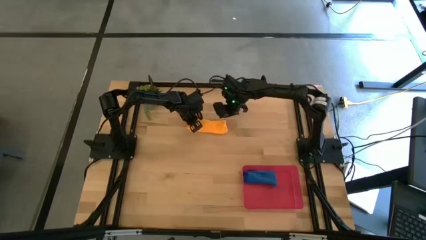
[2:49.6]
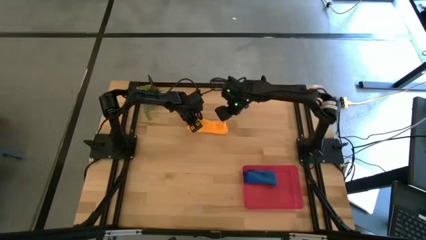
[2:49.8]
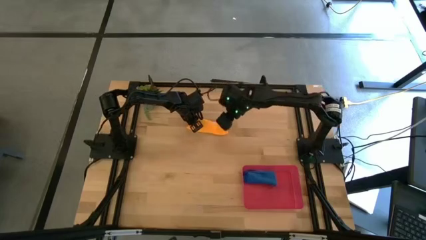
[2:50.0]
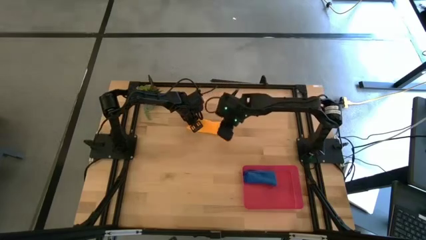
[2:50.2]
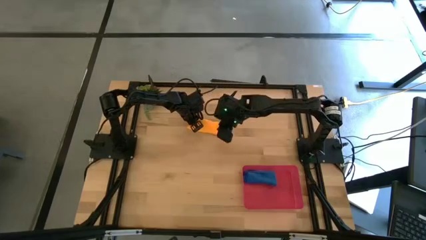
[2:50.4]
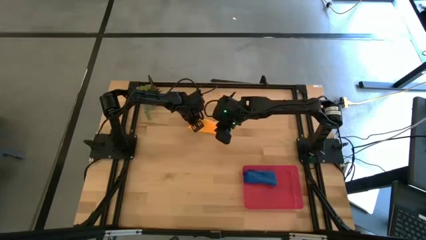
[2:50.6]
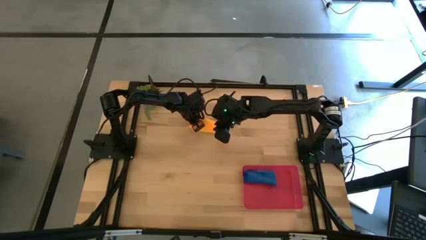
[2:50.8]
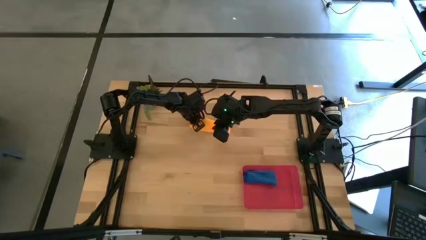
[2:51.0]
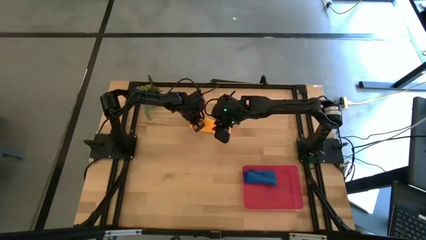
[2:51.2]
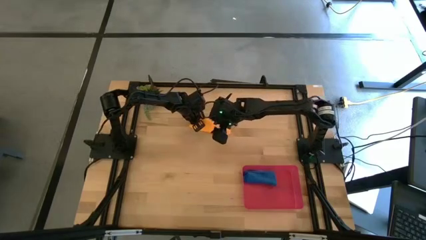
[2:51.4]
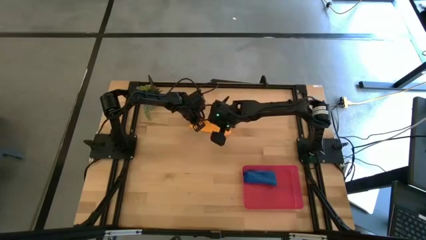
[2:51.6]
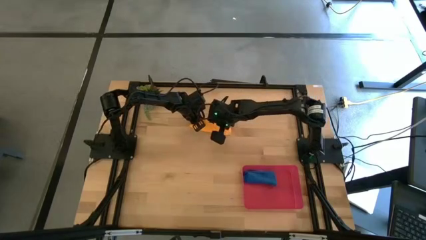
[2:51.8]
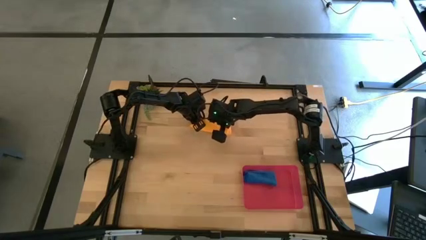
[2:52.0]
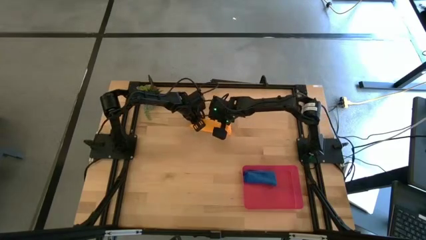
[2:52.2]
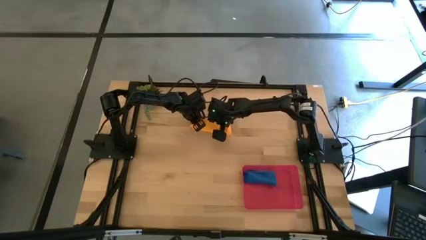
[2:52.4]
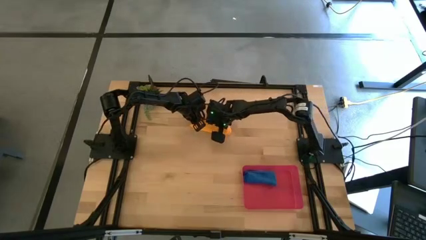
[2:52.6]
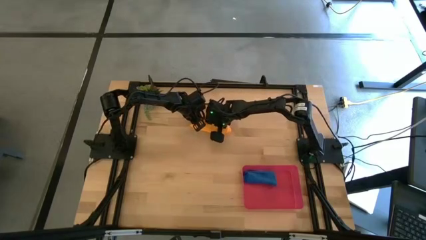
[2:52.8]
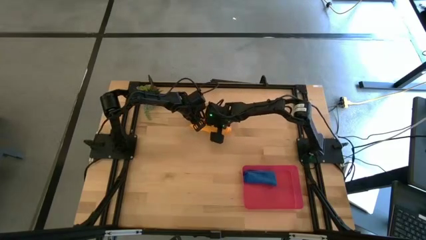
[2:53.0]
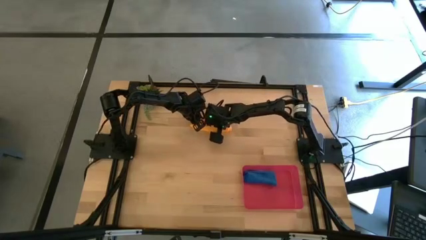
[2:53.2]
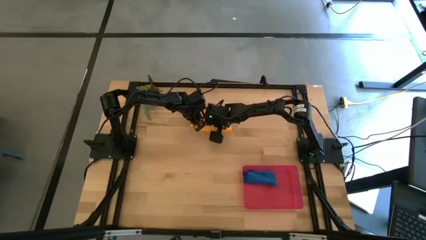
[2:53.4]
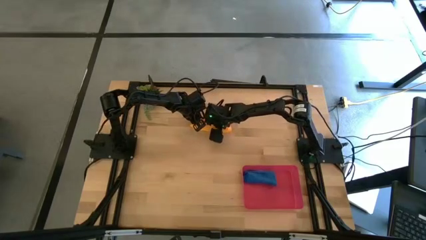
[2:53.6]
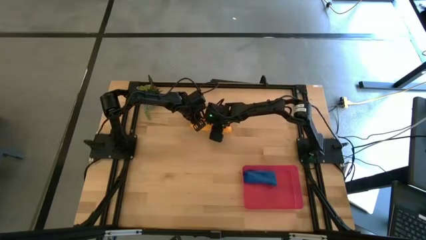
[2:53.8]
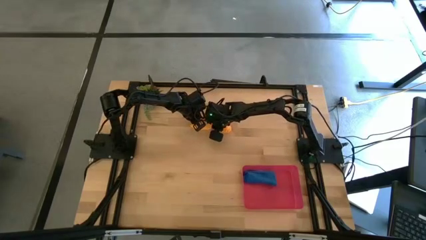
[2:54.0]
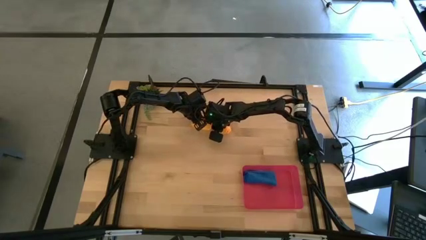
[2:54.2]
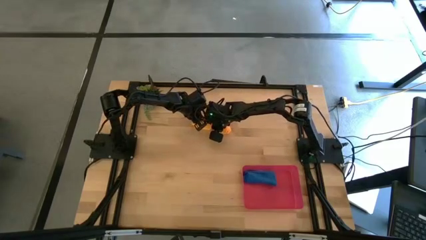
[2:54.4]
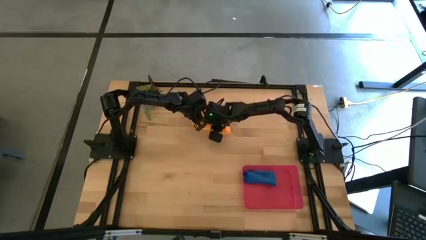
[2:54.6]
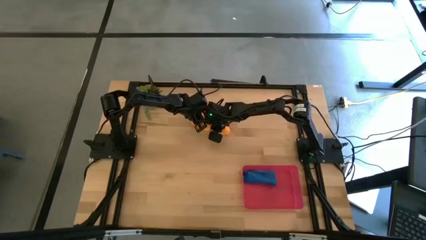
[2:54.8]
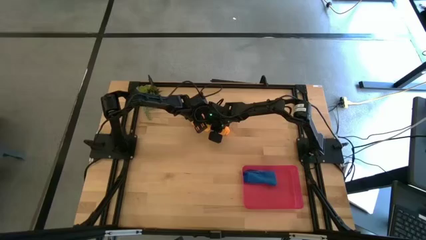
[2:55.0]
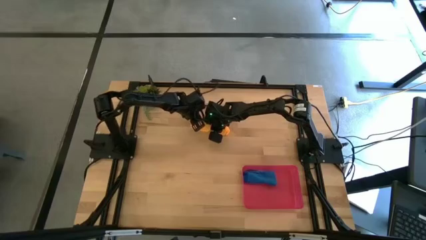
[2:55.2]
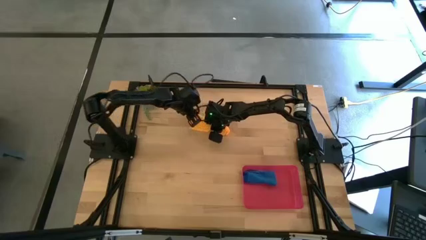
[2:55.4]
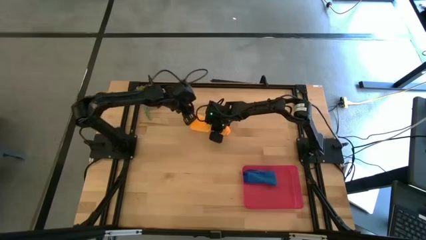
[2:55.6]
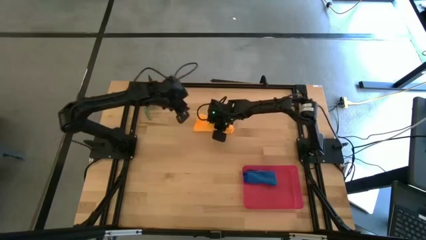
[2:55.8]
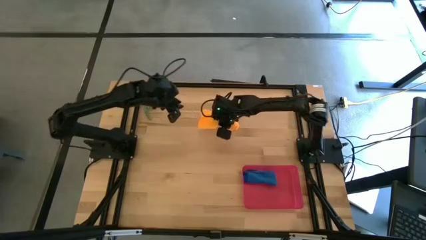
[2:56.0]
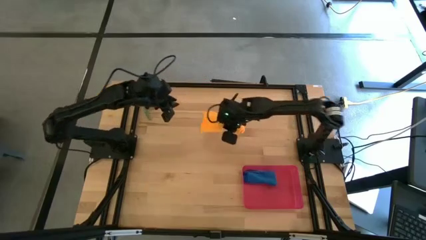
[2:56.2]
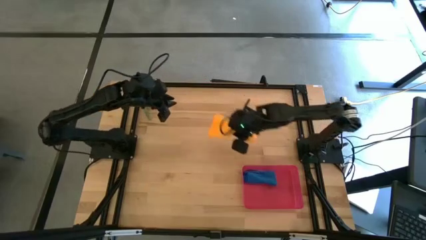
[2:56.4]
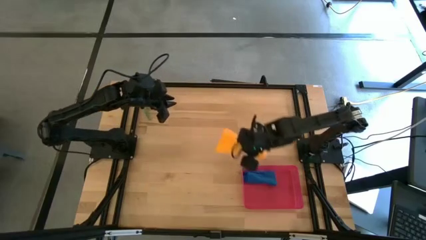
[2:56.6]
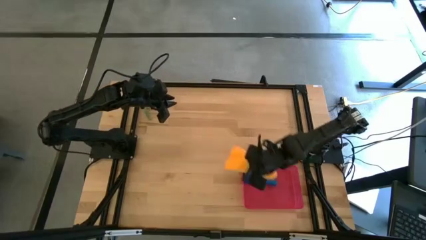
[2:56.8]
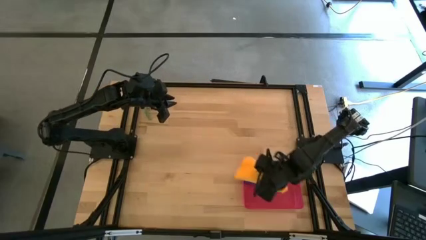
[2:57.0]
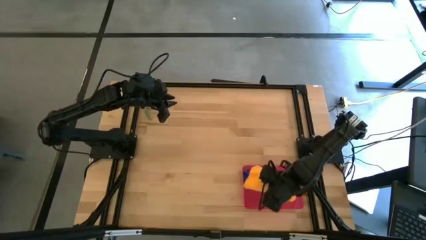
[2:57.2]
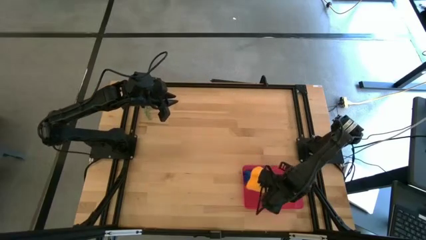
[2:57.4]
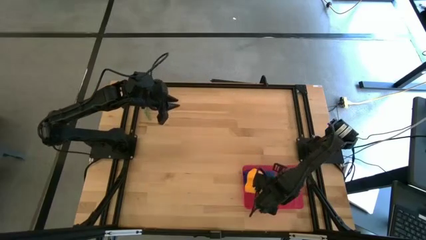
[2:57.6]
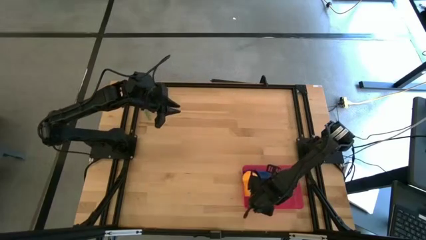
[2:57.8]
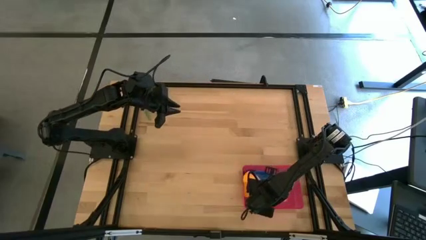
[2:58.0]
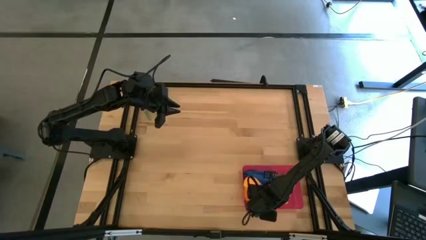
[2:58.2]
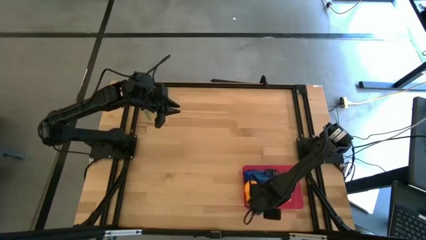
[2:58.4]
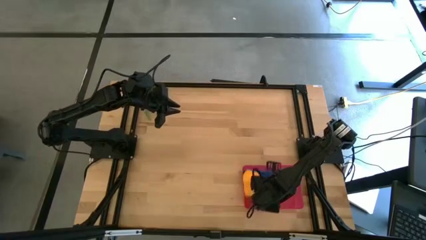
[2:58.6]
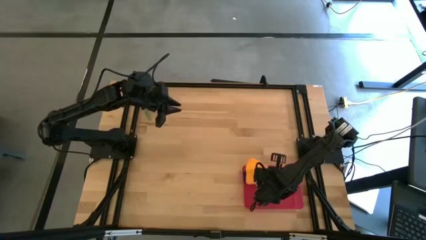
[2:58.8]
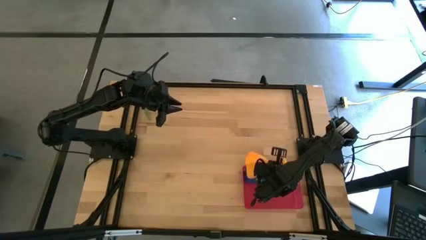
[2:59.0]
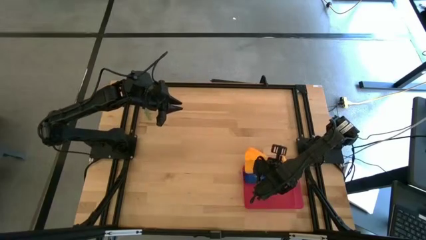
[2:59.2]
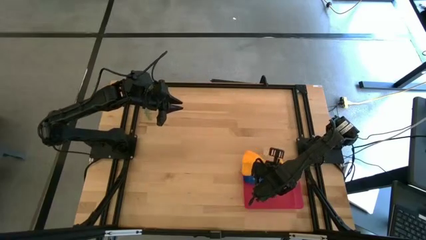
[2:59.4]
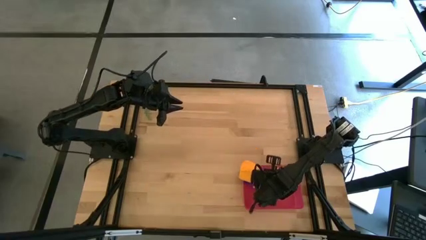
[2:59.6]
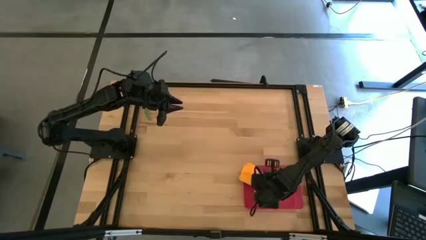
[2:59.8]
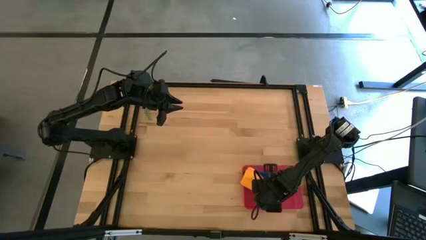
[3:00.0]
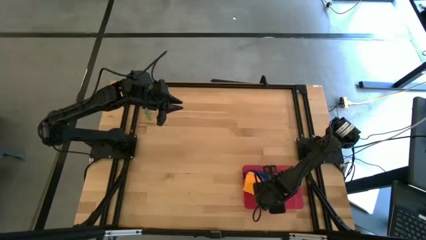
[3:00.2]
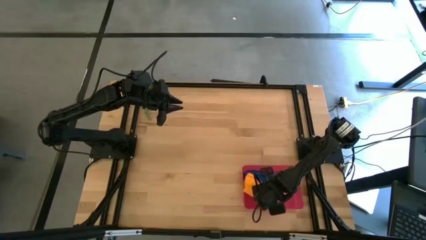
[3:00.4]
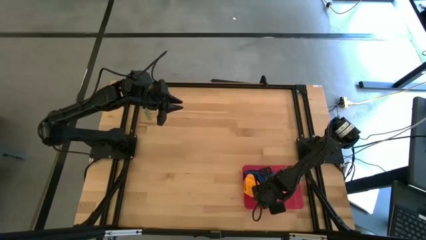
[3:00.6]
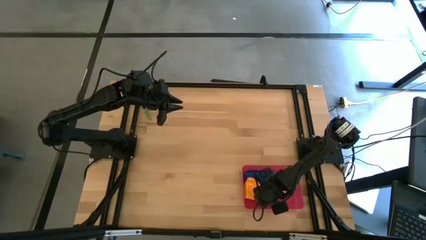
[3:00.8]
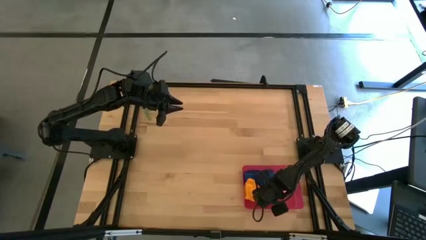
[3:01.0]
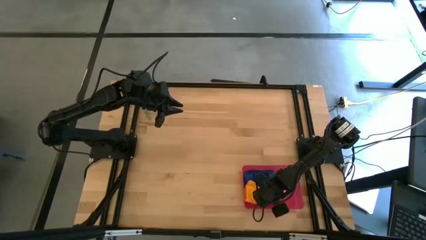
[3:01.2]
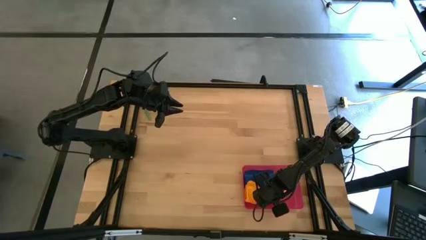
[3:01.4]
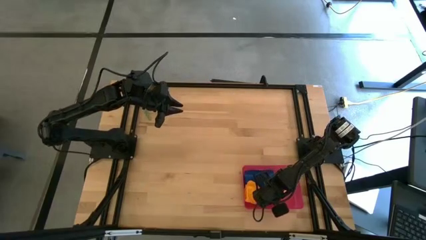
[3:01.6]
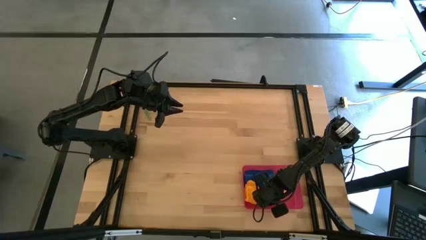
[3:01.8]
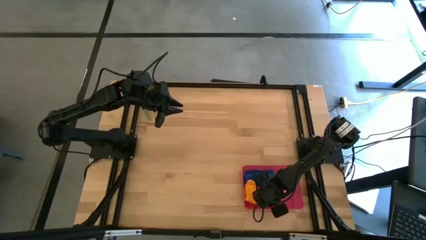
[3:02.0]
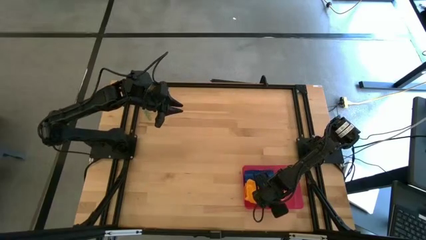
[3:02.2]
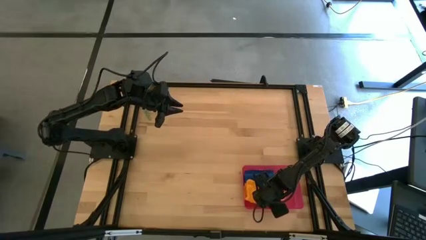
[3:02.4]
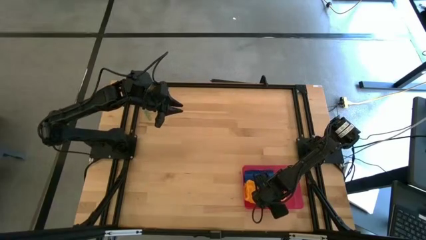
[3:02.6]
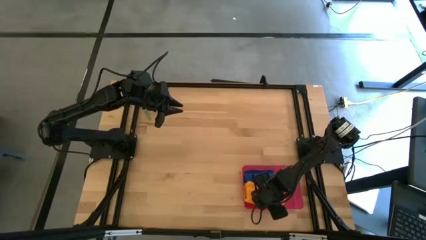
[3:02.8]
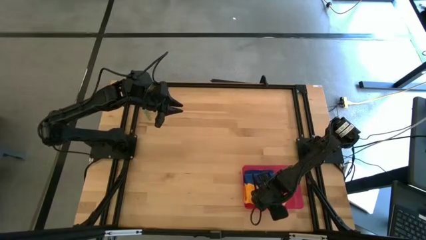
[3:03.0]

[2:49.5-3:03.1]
Task: Roll microfiber towels into tight, uniform cylinder then place into a basket
Put the orange microfiber towel into the red bin

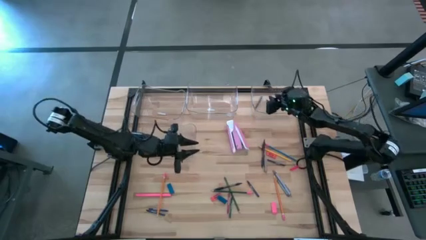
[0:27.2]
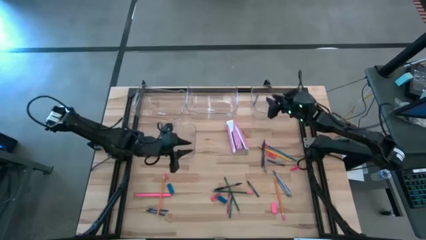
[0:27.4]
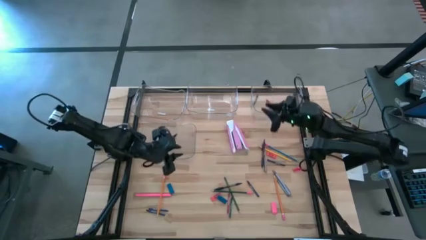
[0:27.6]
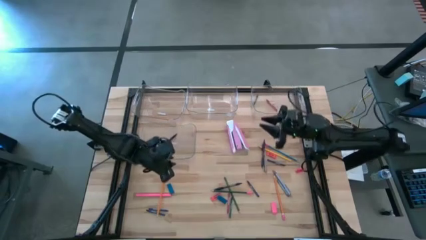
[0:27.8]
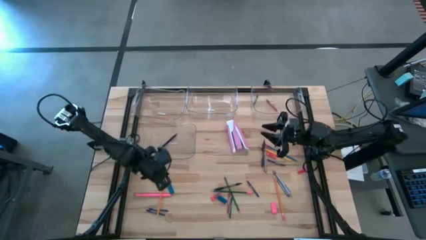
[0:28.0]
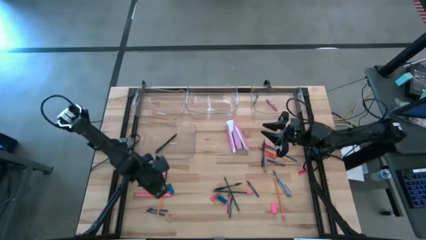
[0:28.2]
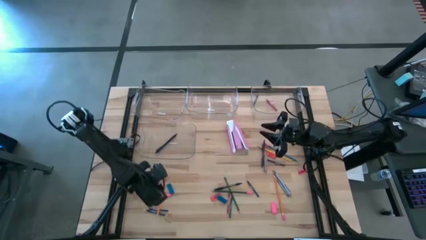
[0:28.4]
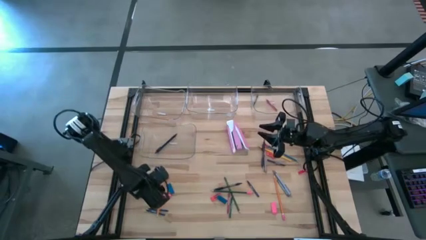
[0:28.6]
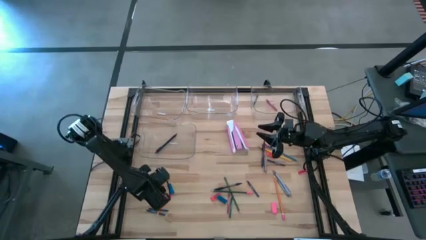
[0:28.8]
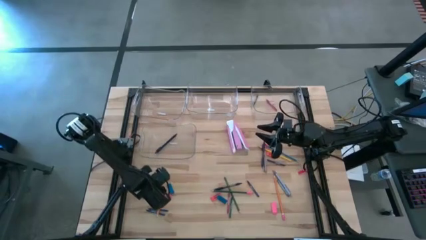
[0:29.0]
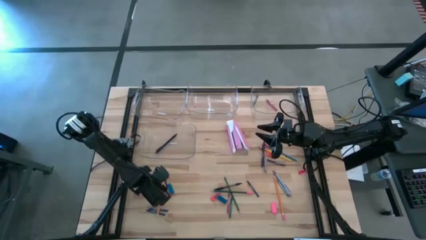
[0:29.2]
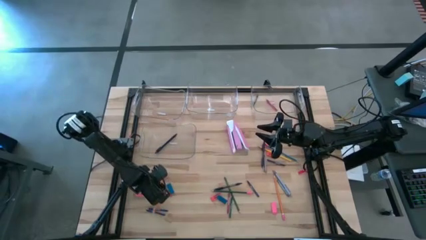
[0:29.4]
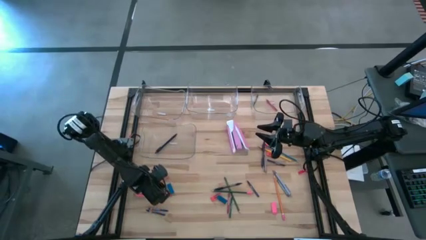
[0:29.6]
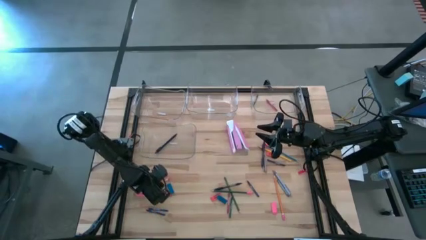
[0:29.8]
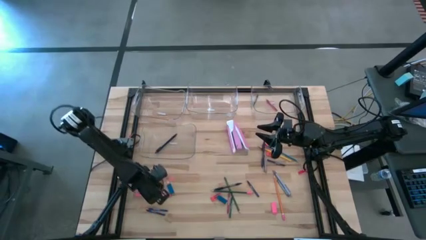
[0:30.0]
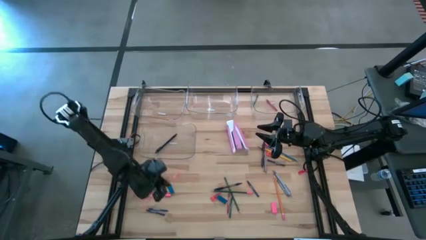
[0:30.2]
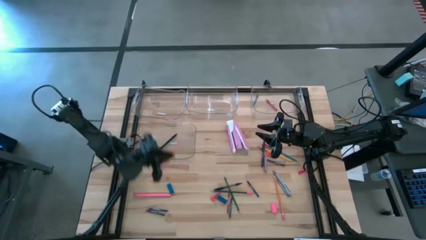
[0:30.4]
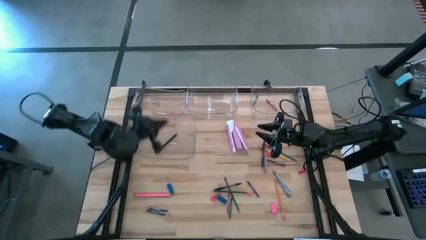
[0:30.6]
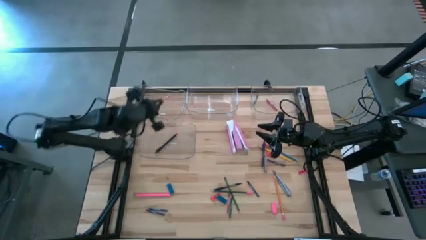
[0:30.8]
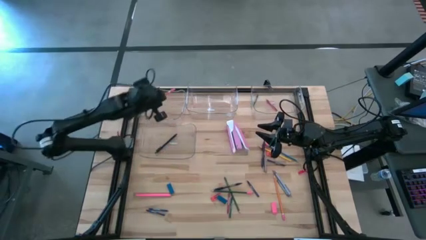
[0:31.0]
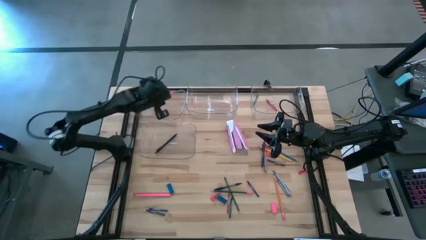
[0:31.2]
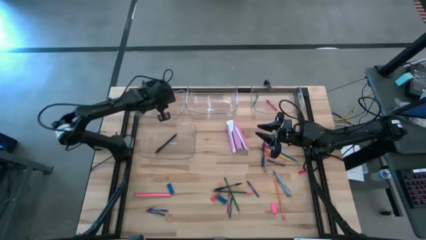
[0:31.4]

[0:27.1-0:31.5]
Task: Sort crayons/erasers/pens/pencils in bins
Put the orange pencil into the top left transparent bin
